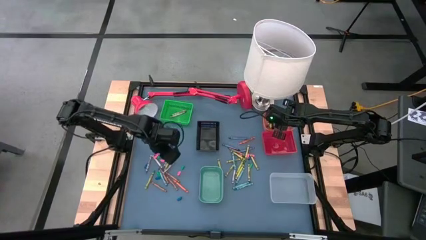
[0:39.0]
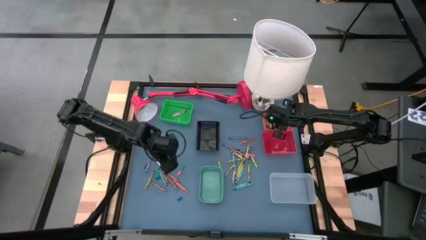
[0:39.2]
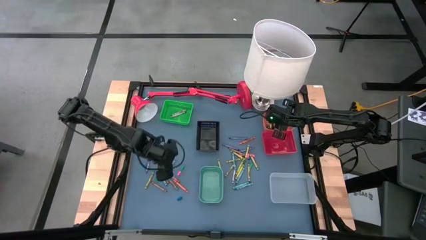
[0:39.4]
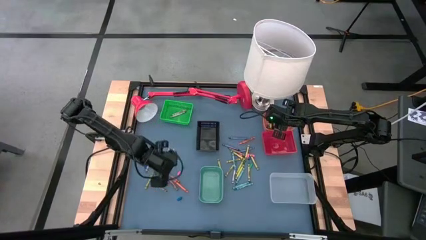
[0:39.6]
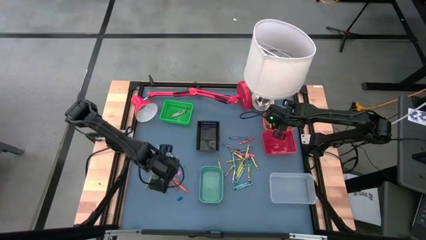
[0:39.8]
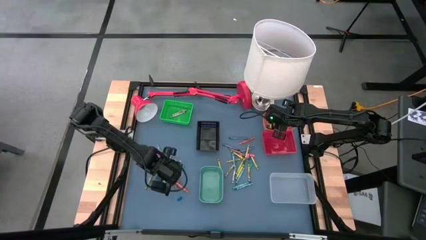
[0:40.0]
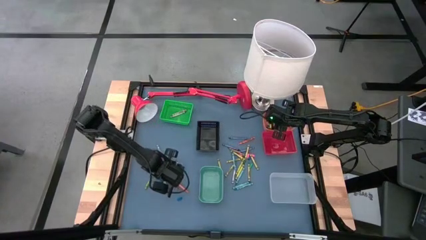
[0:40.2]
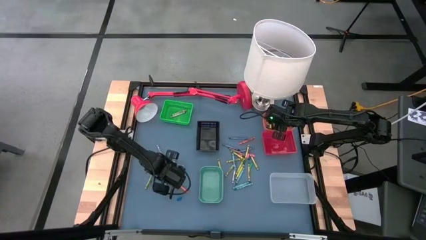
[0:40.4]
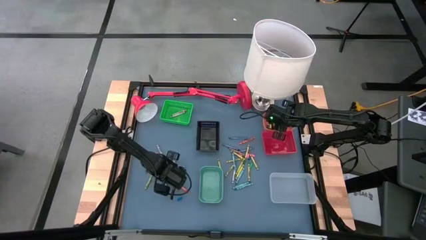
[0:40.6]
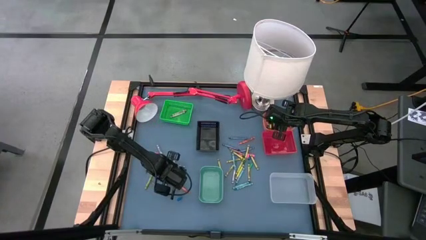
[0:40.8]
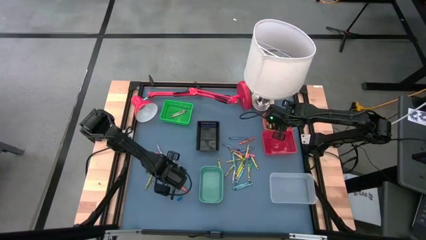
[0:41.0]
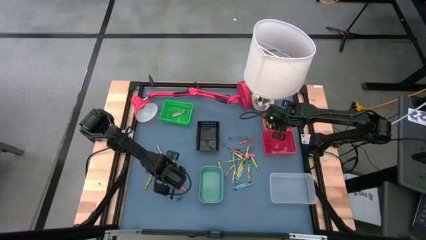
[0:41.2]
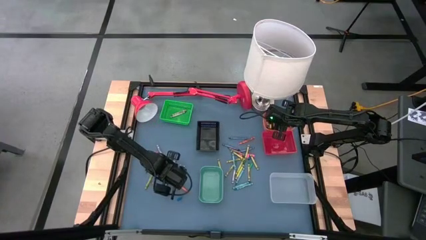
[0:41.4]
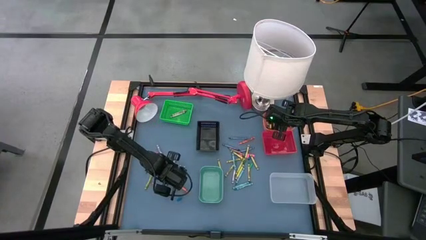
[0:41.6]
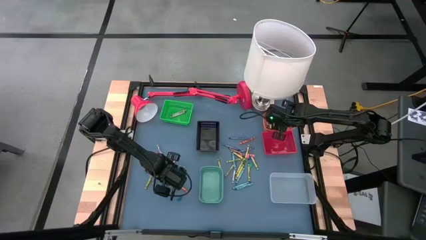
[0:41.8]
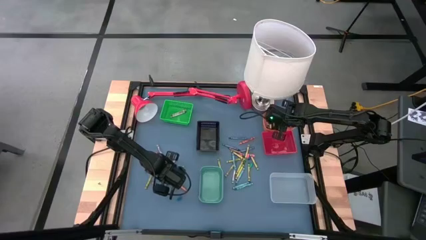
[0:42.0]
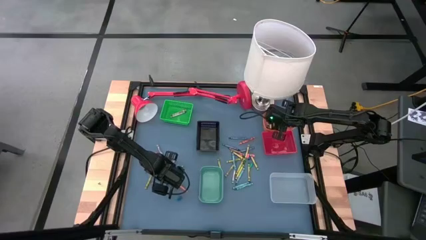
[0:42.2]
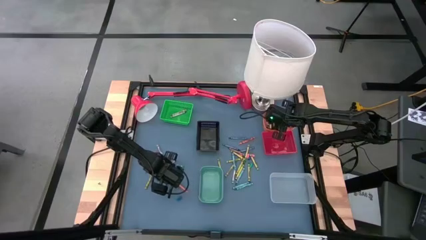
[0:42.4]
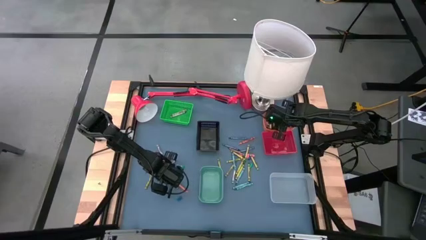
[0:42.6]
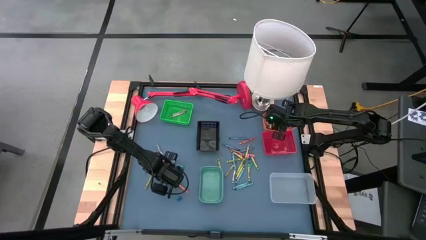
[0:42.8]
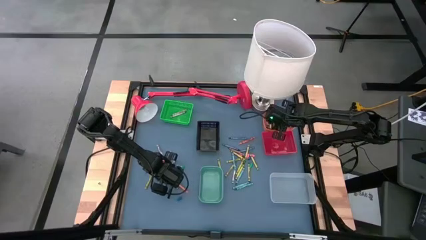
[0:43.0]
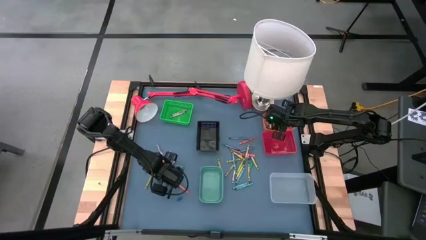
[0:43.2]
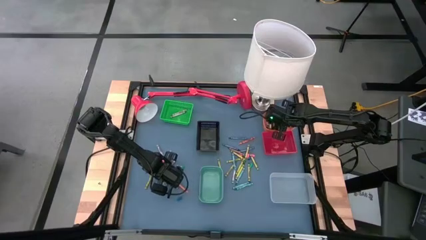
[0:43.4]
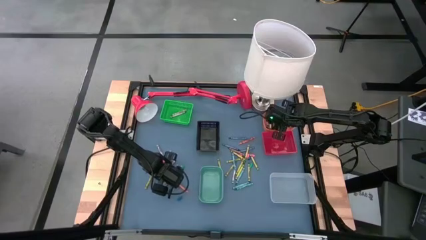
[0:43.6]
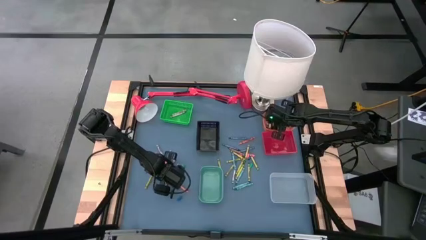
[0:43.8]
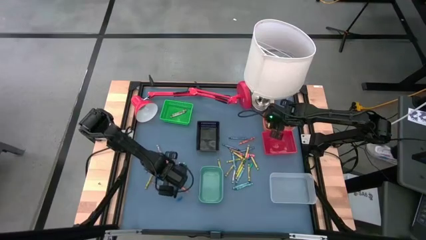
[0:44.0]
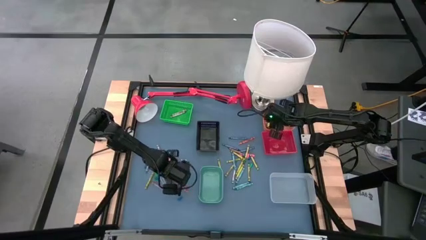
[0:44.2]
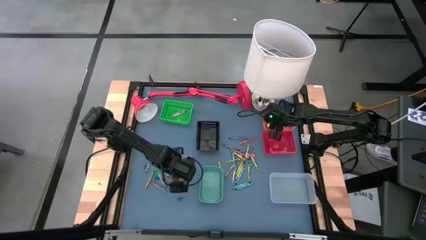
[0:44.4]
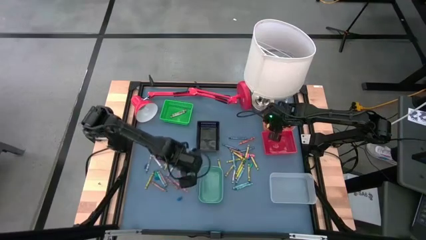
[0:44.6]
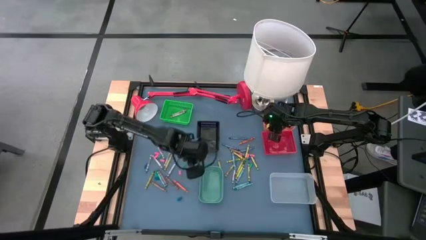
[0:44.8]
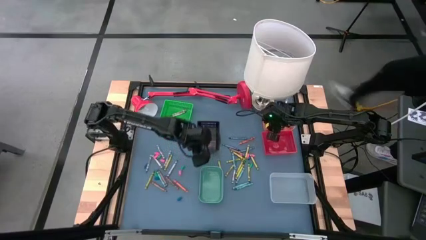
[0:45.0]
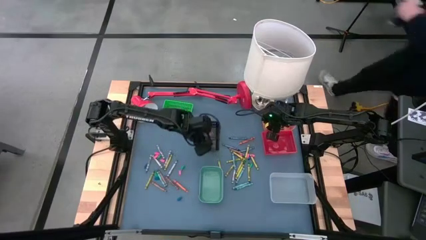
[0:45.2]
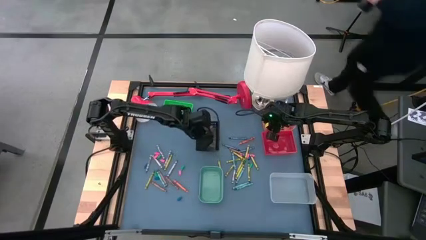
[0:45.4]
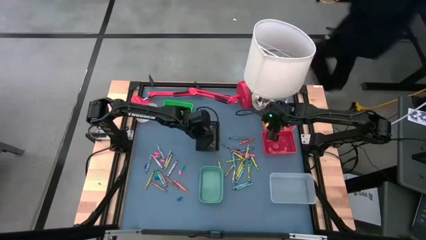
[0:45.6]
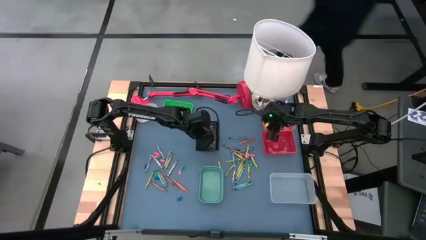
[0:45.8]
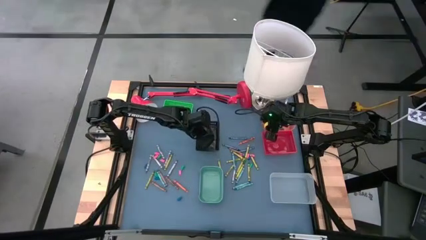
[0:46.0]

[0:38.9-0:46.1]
Task: Sort crayons
Put the brown crayon into the black bin

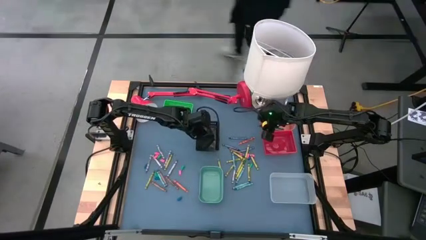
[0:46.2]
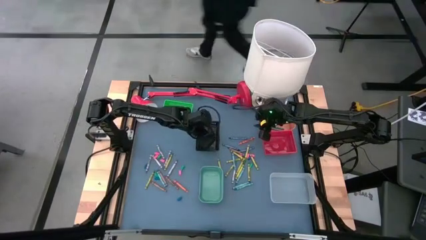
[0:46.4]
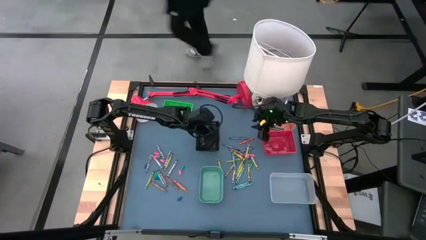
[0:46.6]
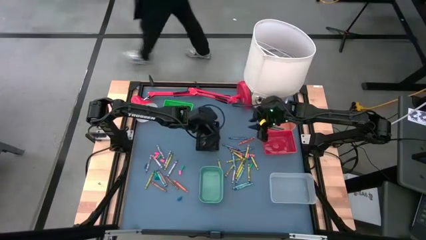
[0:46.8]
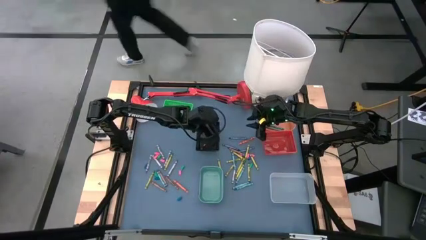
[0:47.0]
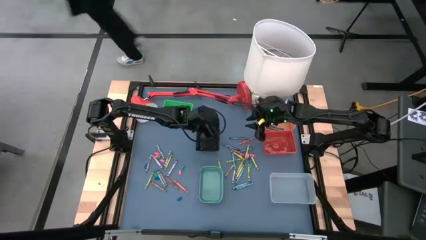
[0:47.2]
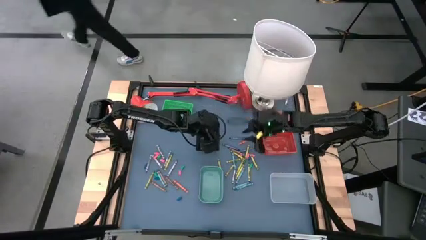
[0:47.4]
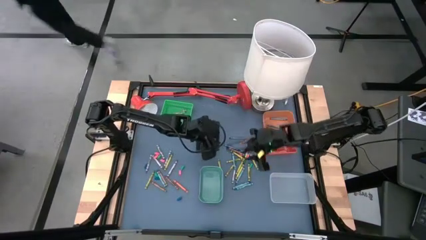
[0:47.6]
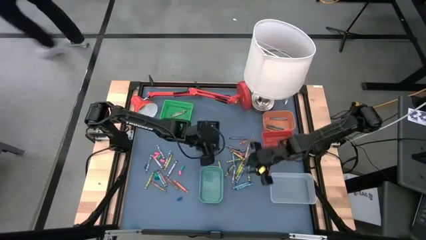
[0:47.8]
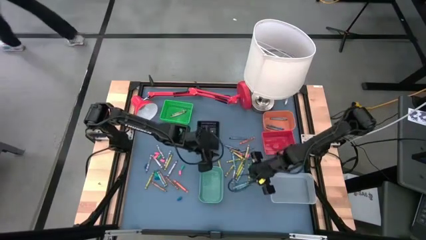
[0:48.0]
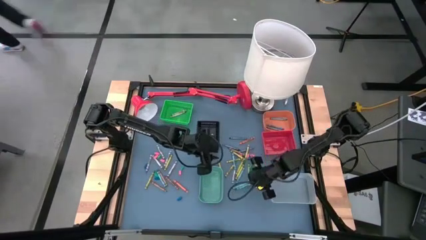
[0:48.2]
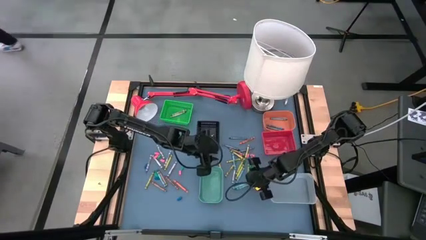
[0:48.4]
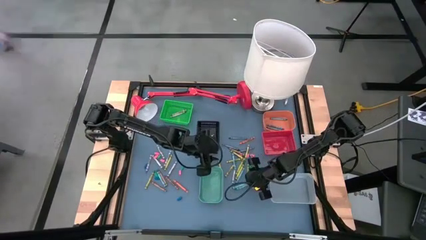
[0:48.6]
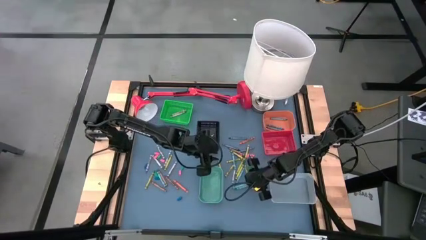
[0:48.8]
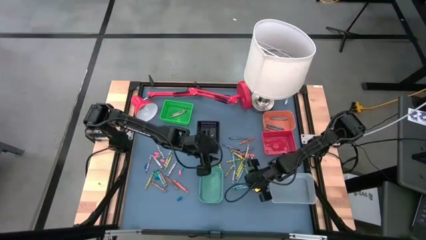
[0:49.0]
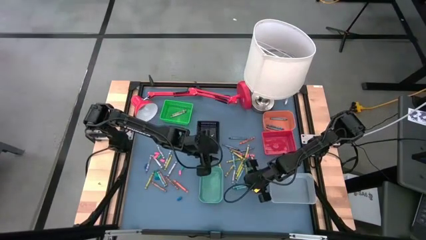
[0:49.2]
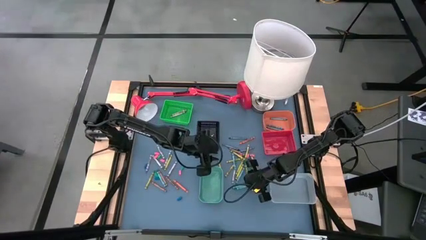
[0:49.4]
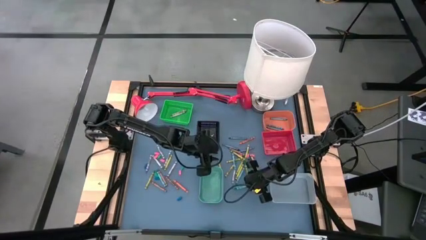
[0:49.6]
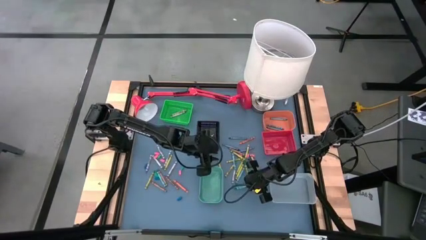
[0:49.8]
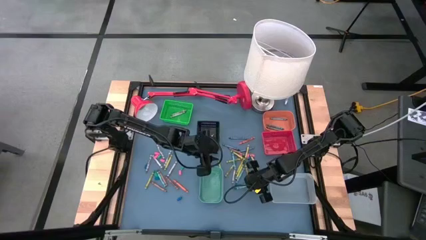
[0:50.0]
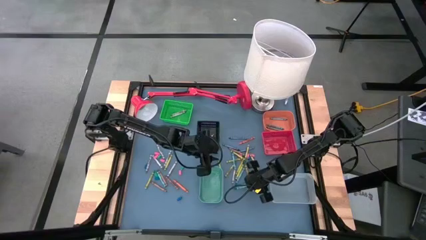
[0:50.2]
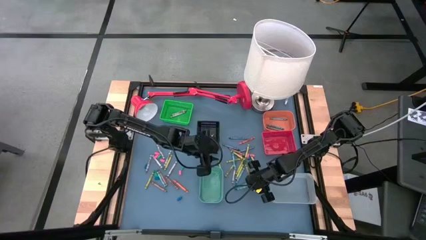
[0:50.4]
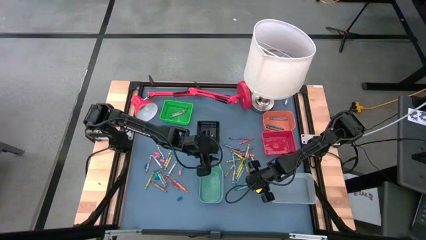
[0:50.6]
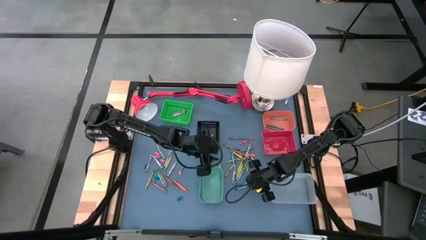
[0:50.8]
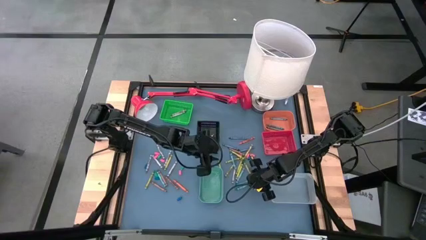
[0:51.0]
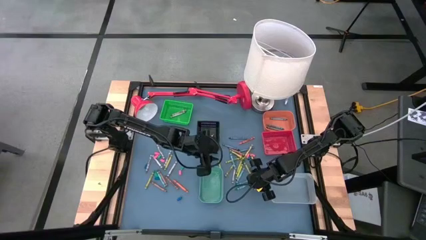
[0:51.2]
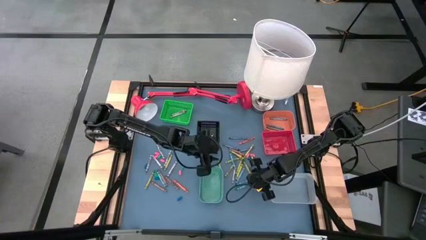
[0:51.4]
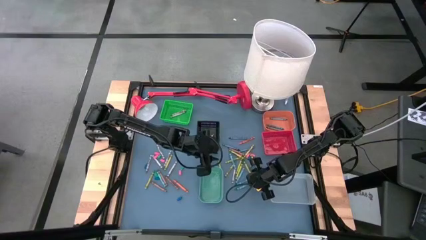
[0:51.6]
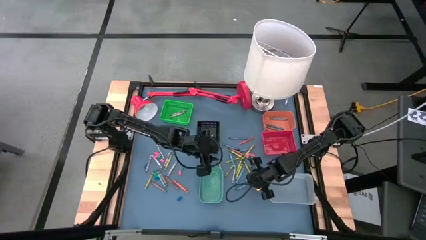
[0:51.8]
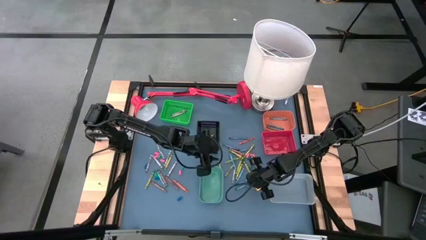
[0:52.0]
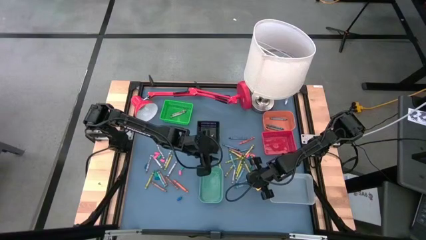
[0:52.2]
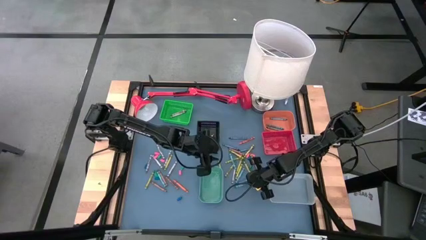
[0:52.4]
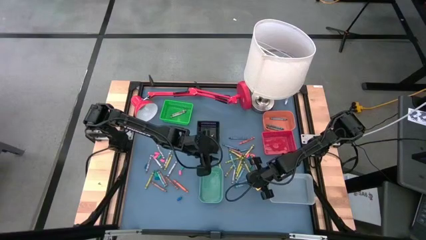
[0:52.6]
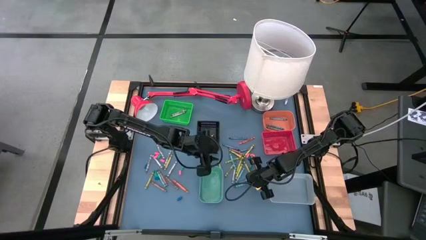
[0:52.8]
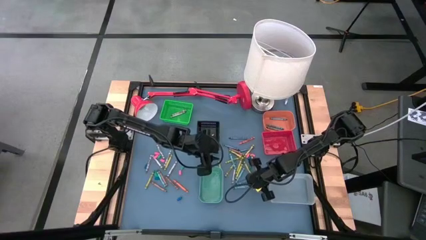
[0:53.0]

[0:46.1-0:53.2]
Put the blue green crayon into the orange bin

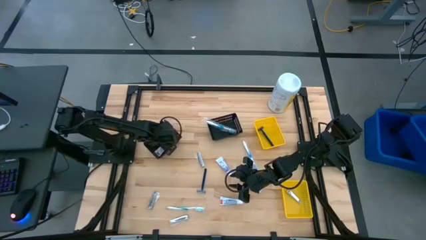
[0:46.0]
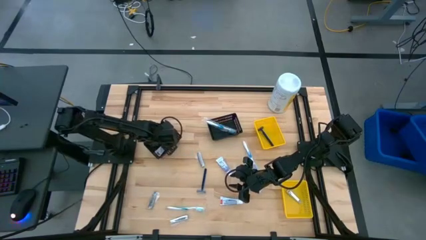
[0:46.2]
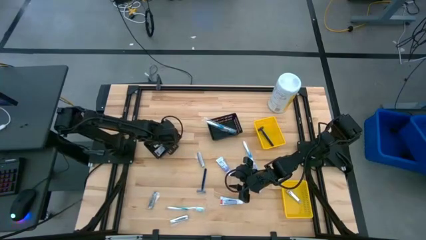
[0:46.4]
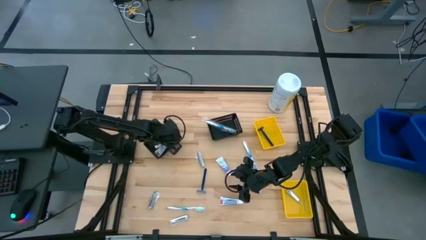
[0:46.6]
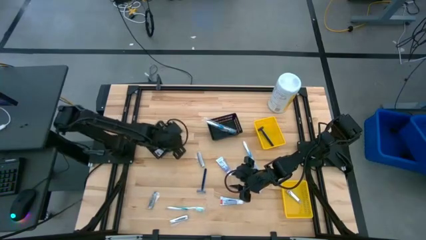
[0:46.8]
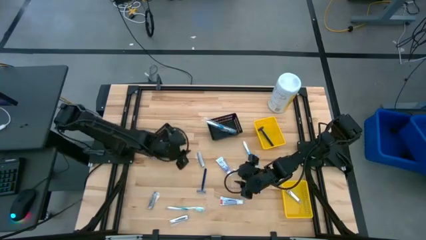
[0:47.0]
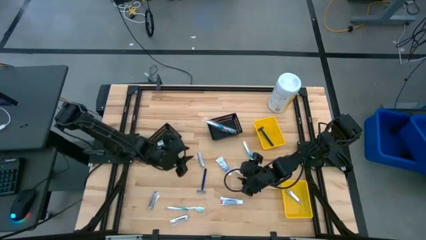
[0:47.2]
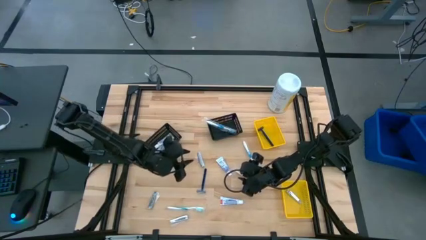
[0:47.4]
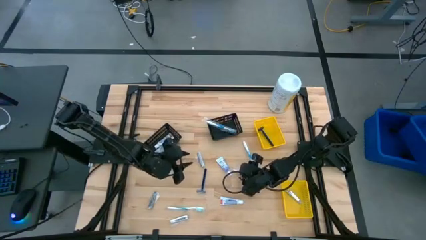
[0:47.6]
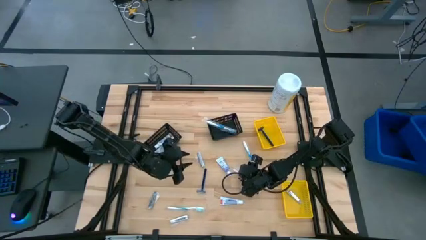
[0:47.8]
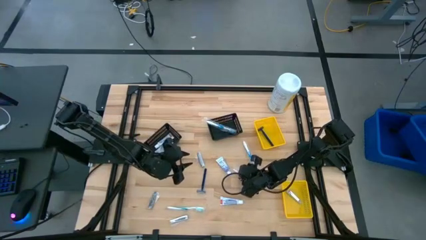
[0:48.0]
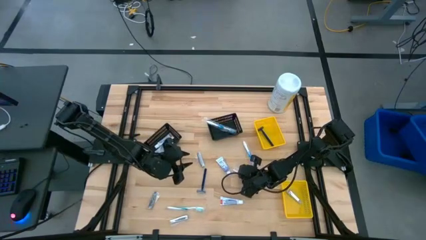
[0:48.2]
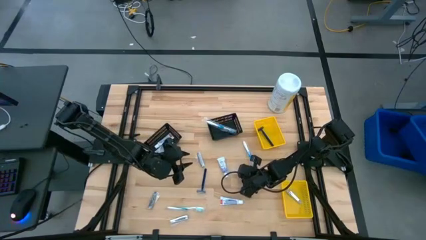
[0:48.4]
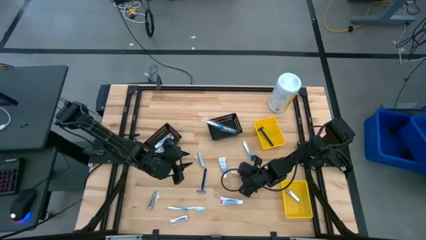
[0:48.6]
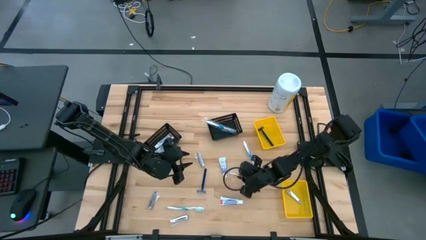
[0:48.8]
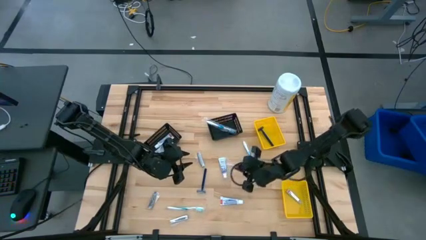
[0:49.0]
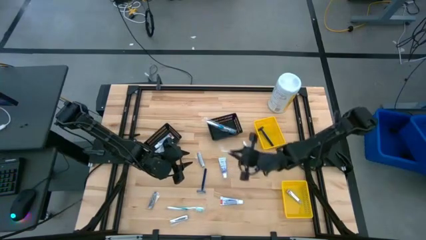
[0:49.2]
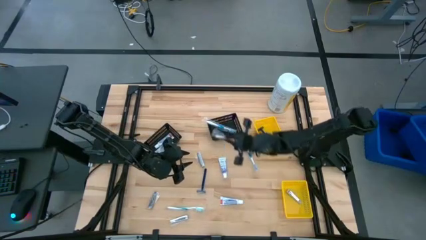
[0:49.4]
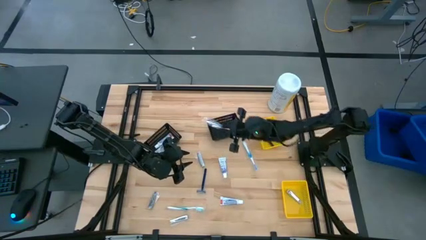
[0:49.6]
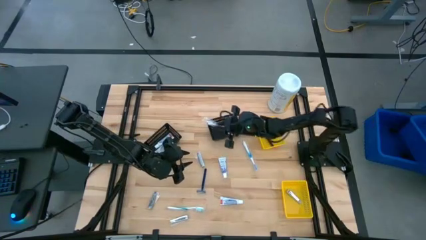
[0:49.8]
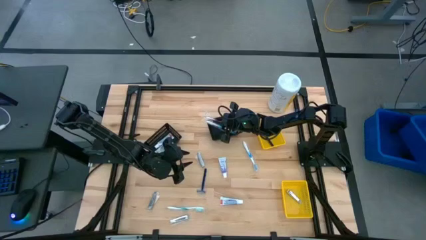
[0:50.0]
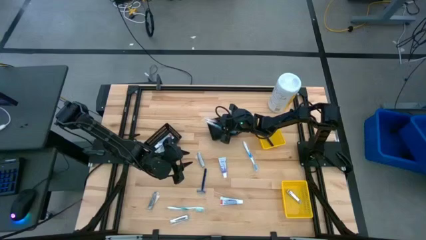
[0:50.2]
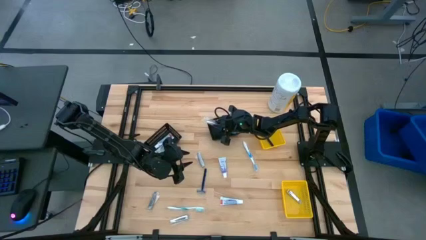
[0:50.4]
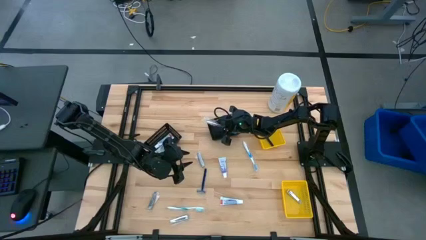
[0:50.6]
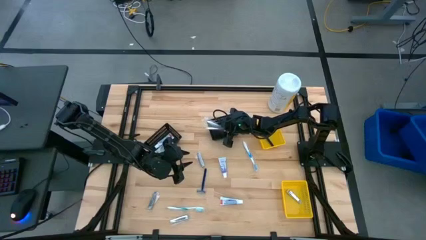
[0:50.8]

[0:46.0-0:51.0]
Task: Pick & Place Travel size toiletries
Put the red toothbrush into the right black basket
